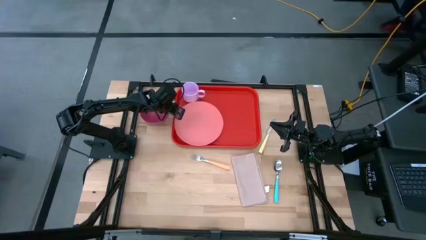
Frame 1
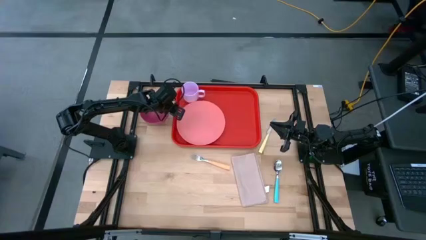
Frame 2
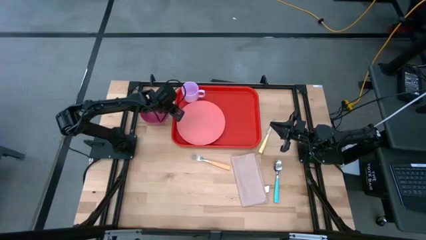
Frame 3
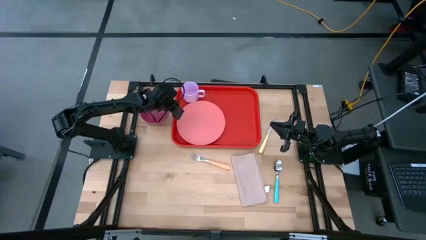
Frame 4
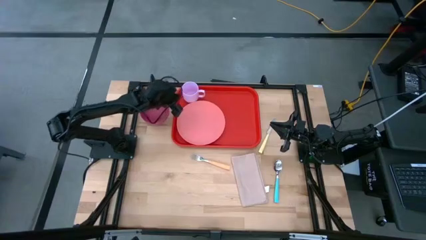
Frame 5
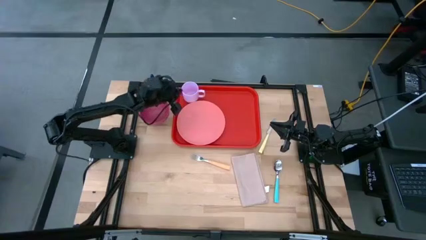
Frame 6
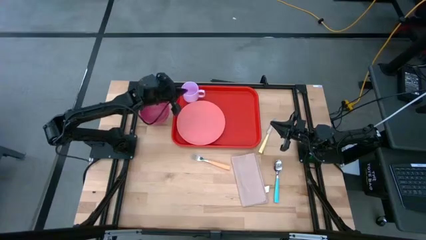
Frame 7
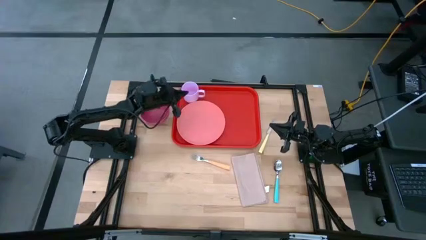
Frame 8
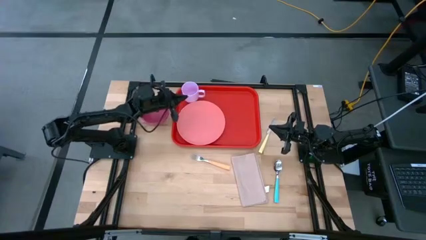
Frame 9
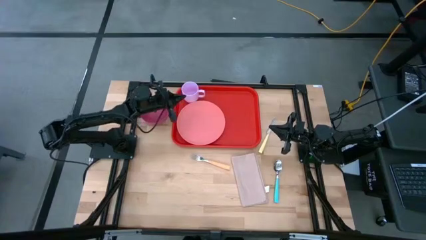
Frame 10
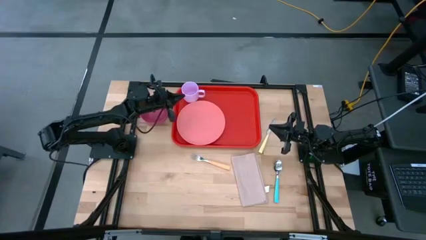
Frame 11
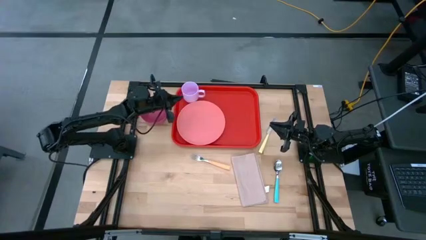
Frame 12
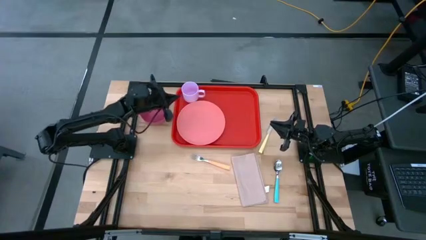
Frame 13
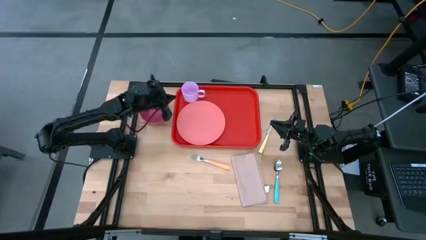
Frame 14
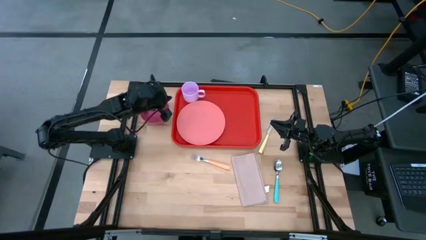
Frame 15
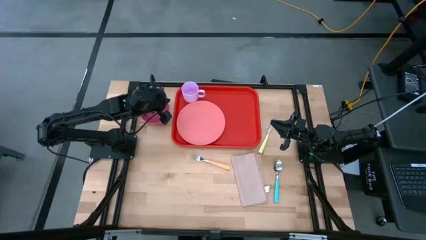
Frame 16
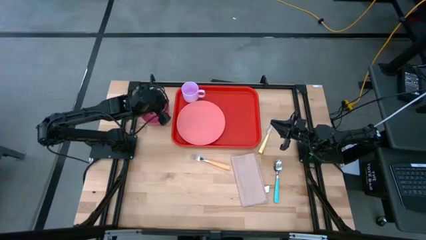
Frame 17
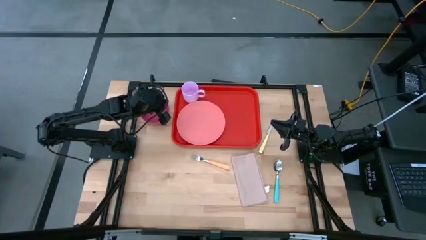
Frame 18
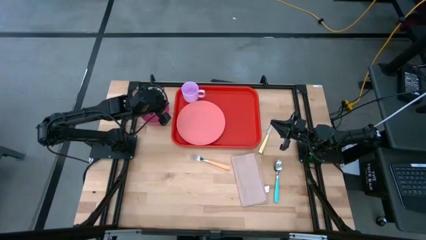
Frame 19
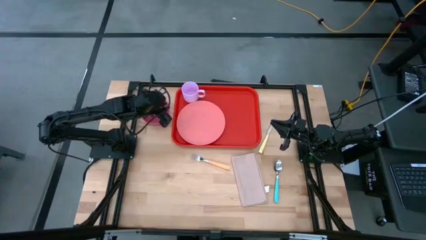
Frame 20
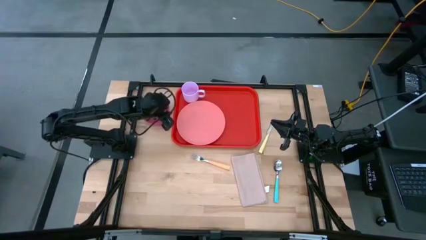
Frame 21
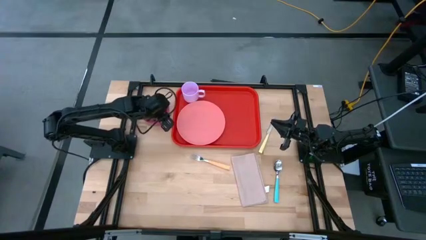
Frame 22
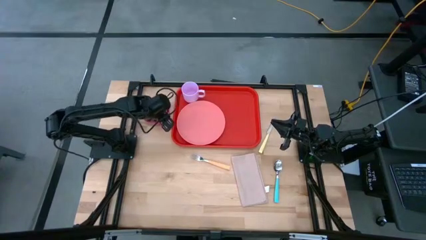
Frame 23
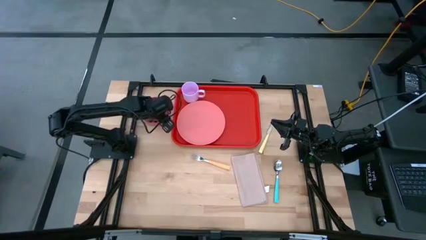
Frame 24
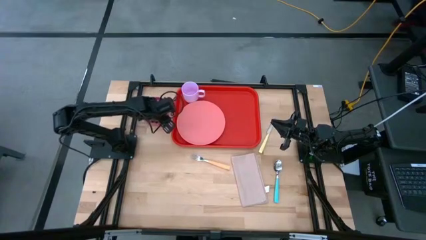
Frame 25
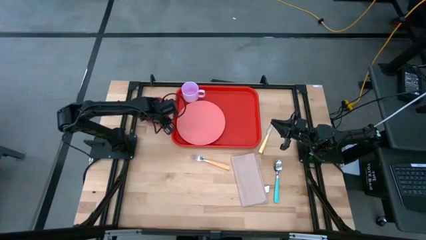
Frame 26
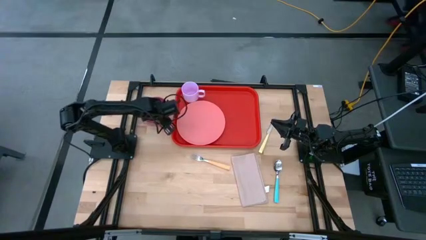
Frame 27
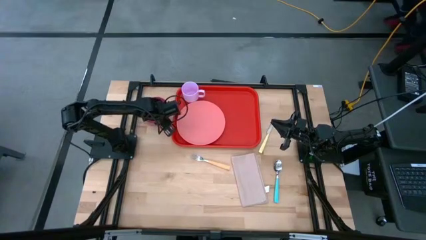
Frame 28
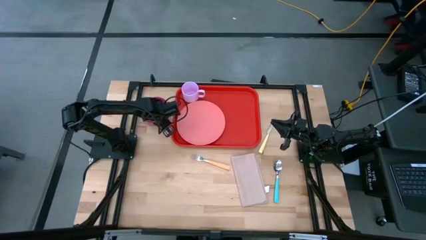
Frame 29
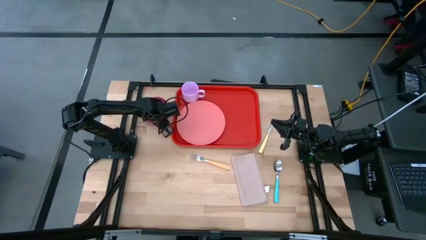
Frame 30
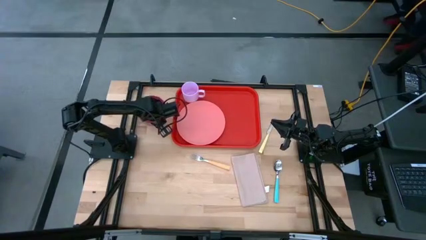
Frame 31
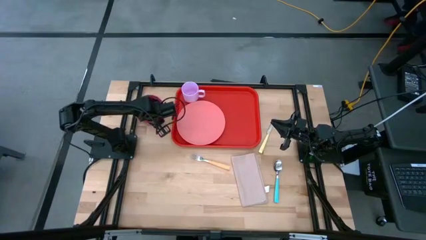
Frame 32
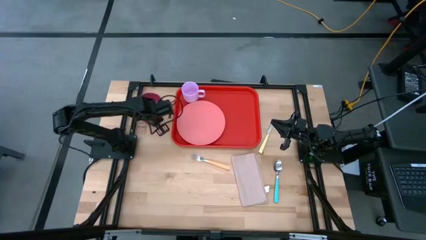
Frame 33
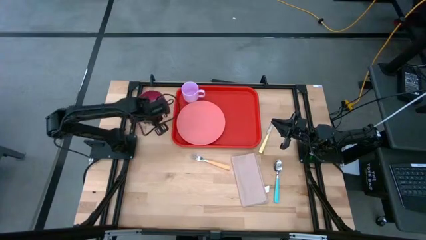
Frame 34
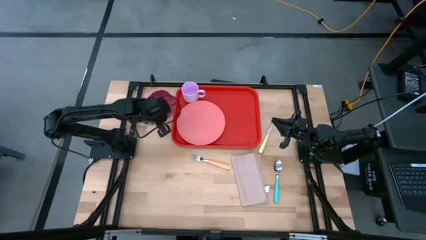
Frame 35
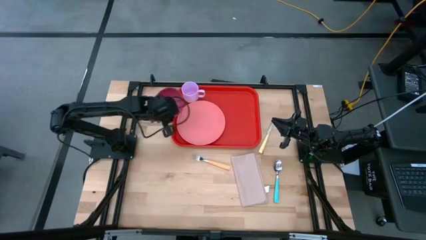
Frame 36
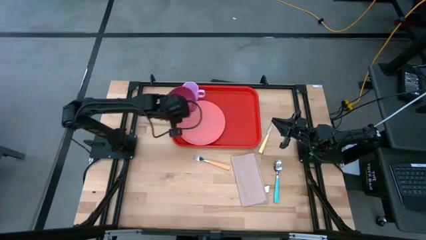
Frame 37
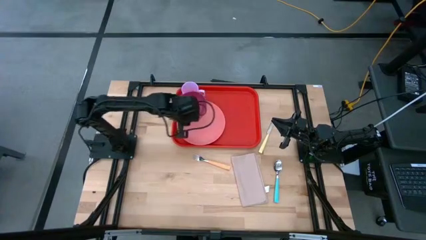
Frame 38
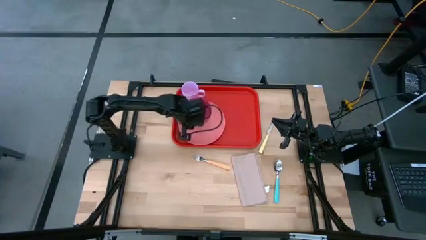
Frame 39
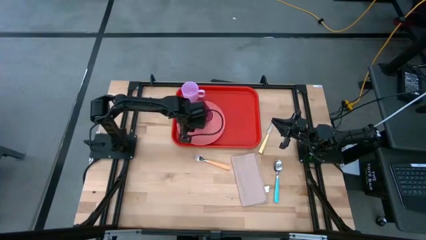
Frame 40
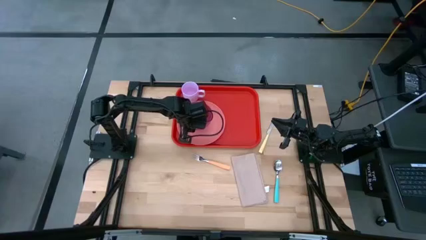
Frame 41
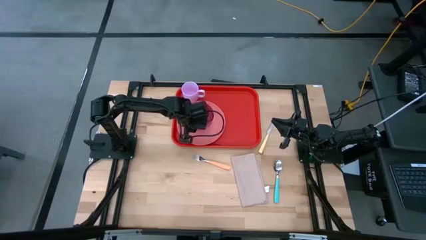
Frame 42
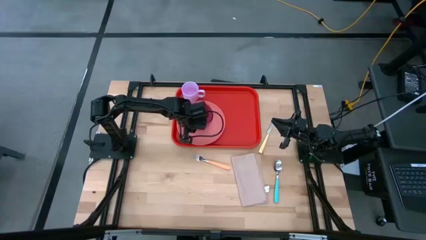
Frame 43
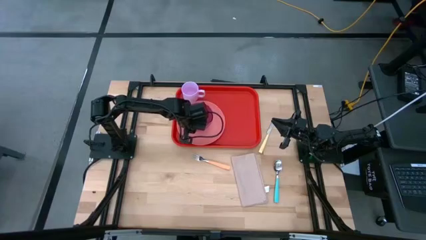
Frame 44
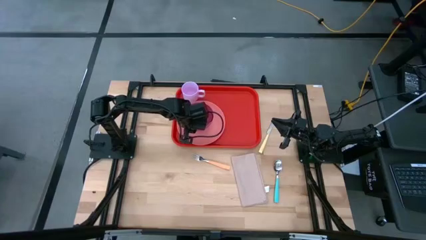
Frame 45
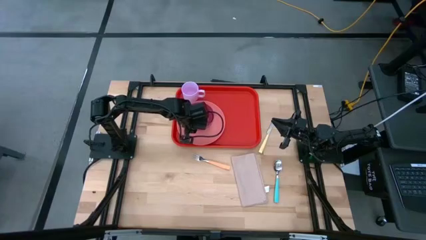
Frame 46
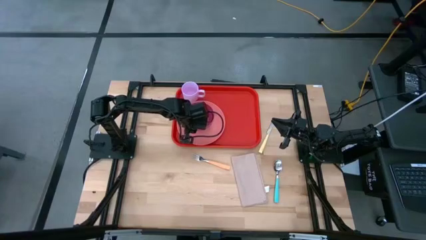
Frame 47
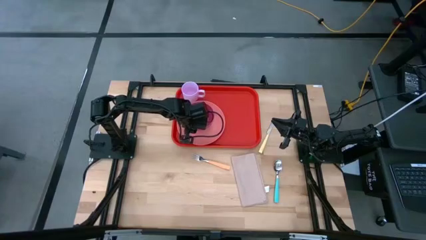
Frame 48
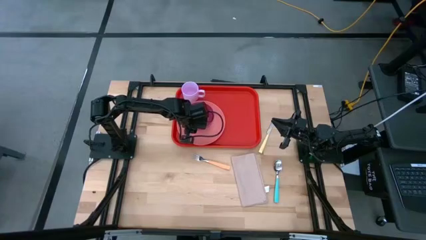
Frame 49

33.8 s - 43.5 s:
Task: Set up tray
Put the purple bowl on the pink plate on the red serving tray

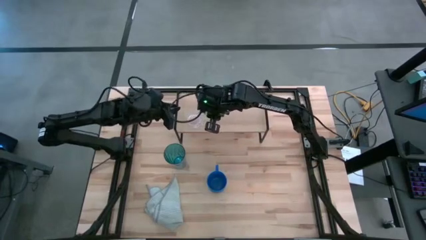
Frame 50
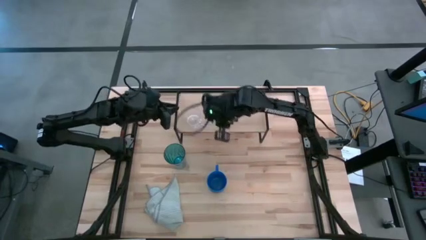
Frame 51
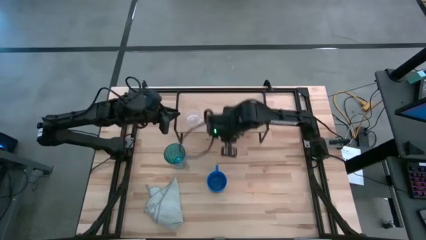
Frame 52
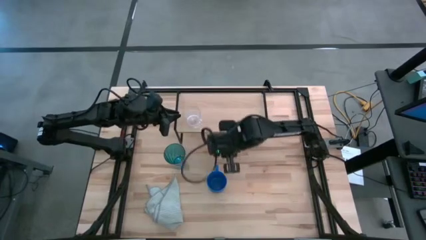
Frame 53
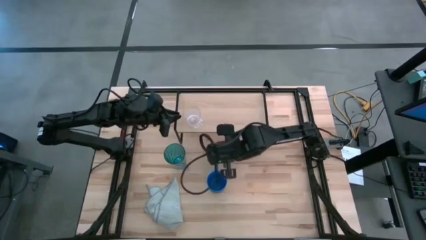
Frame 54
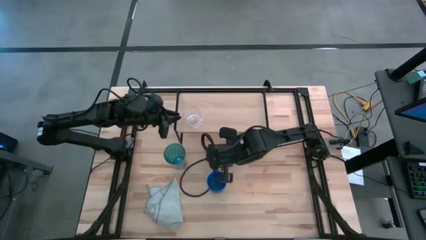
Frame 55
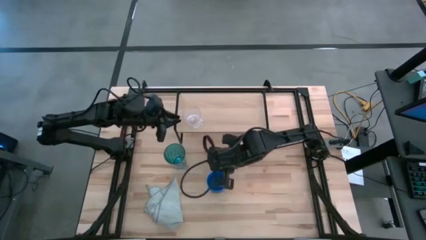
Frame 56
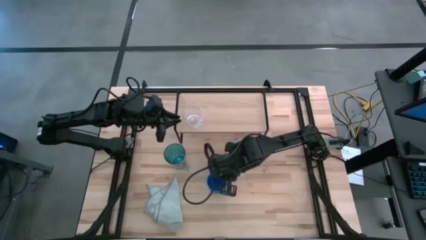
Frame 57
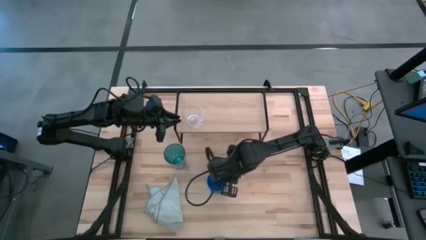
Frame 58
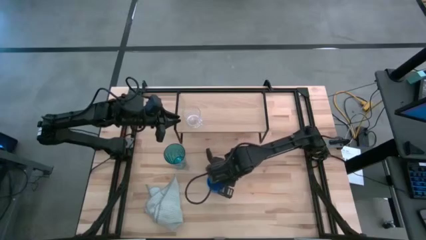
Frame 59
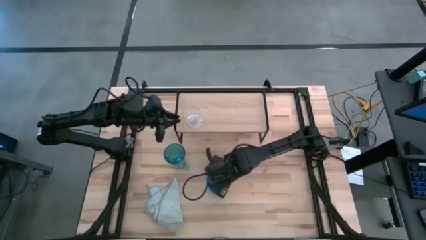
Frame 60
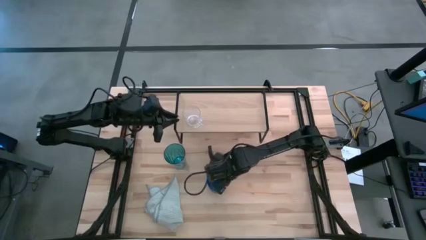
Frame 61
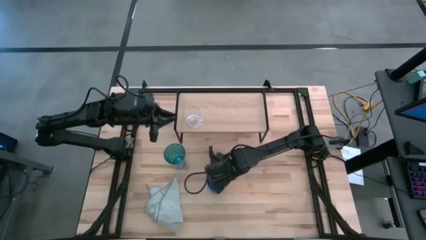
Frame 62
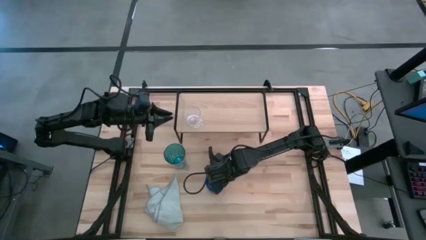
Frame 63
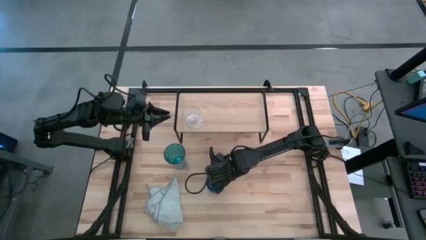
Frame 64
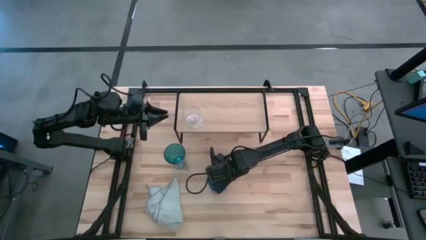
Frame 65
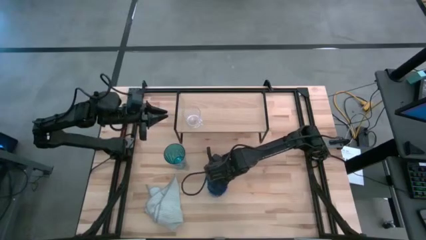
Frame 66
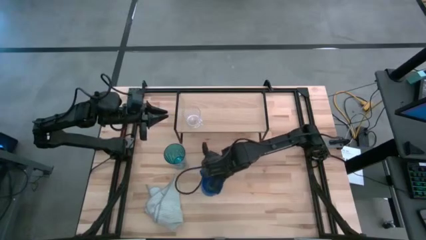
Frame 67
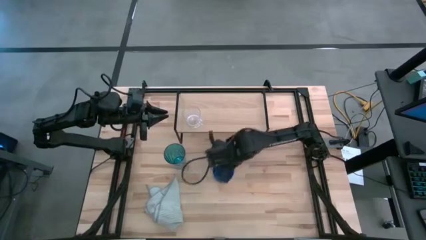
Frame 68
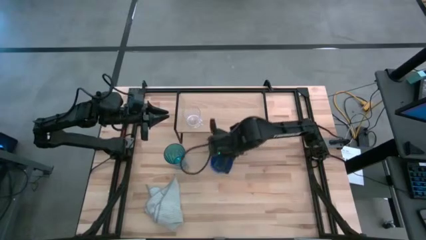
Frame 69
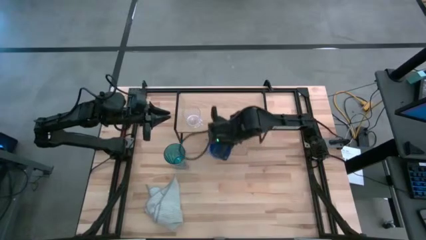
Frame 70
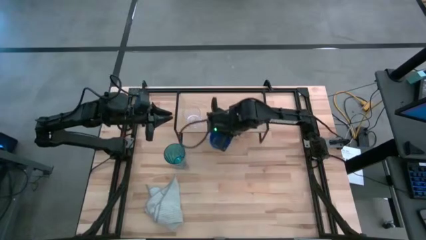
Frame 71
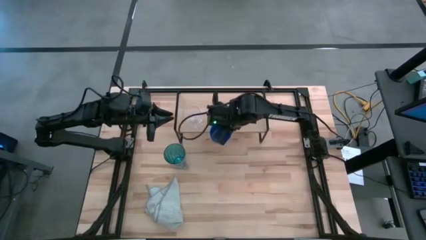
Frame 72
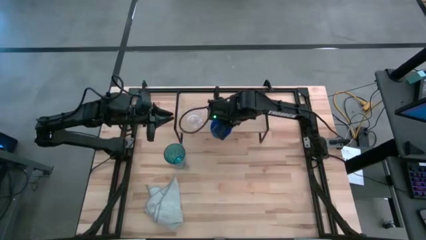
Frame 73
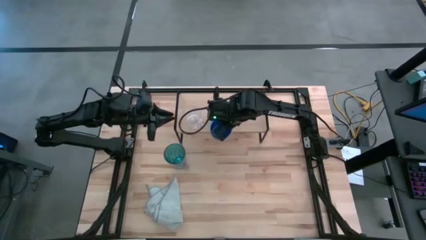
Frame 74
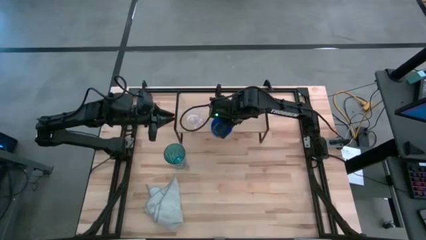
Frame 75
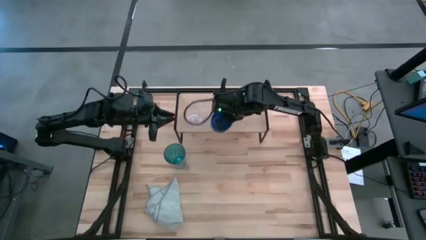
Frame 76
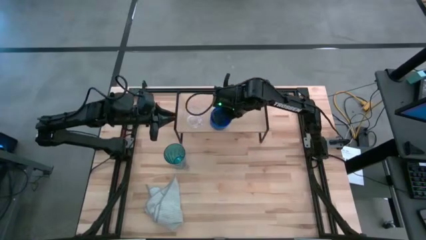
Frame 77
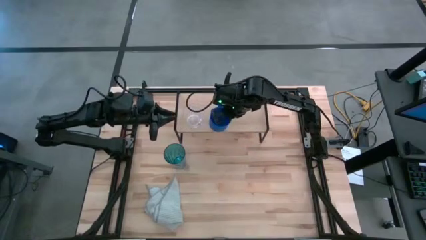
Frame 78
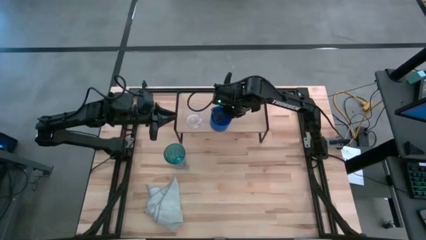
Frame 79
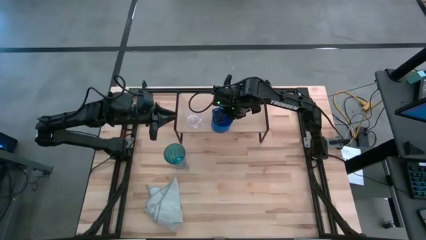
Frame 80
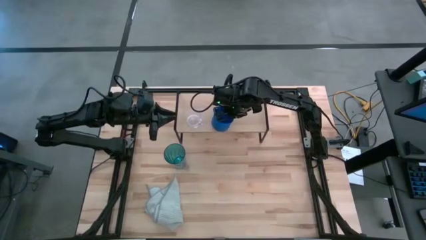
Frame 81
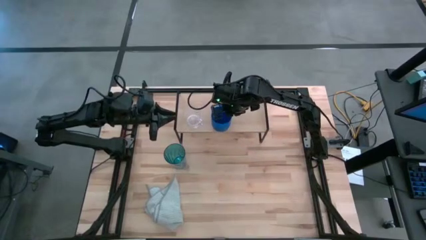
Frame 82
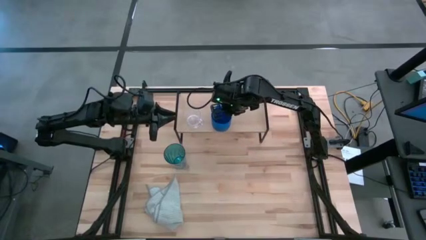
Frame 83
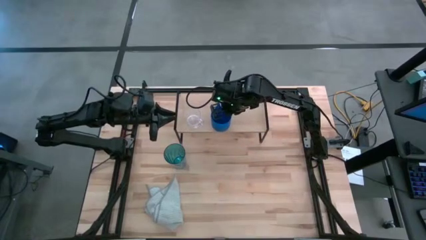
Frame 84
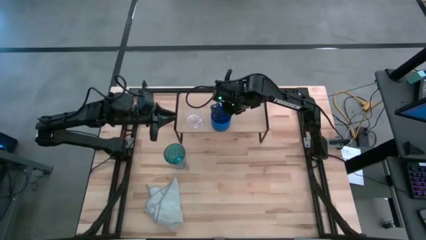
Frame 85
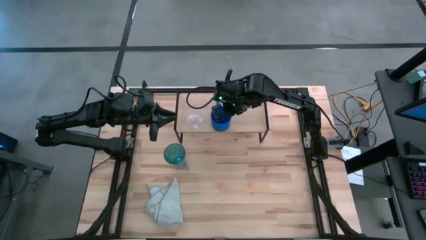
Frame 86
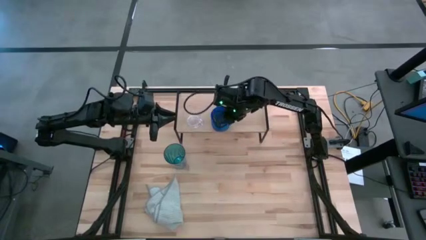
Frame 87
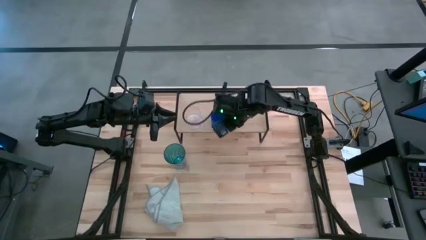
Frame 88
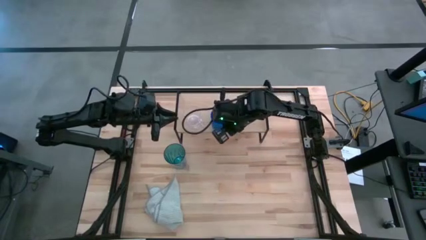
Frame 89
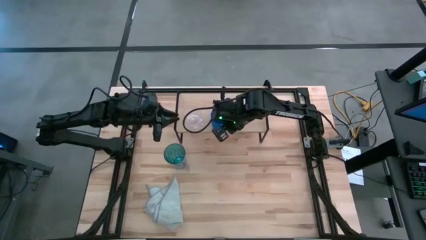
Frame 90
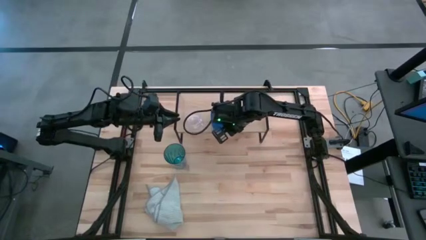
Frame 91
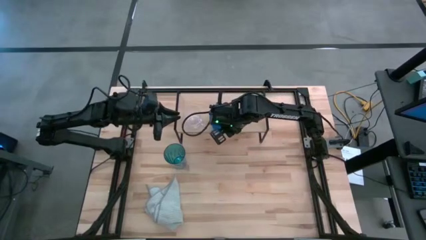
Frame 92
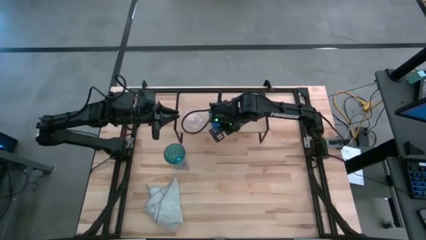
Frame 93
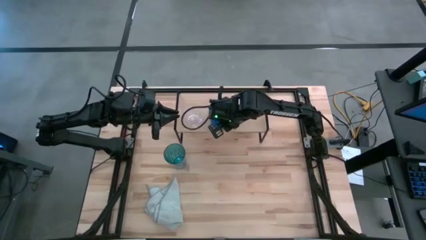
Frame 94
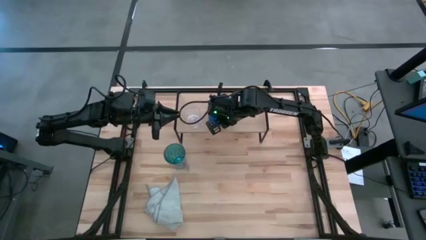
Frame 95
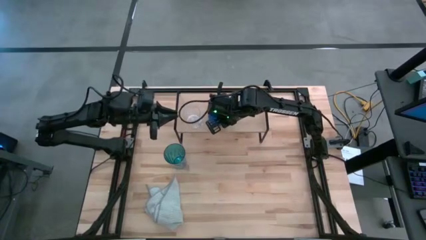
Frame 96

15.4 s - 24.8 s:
Task: Stack small to large cups/mugs on shelf
Put the blue mug on the shelf
